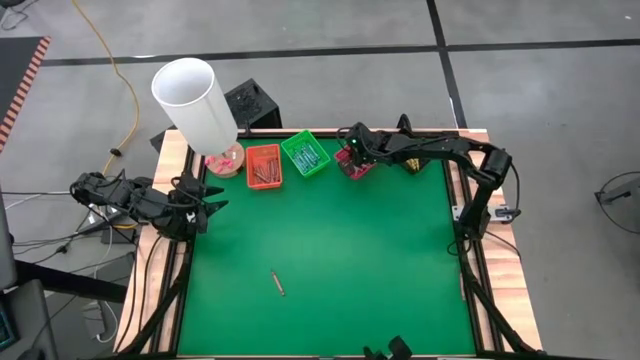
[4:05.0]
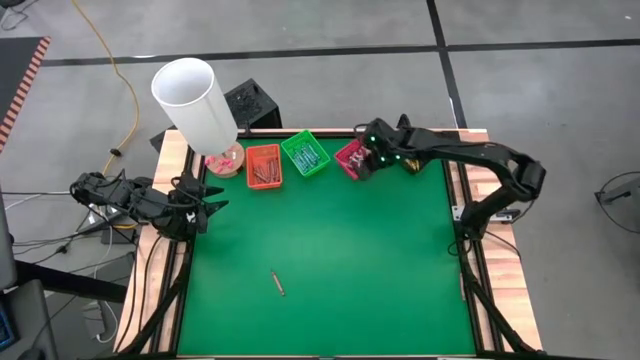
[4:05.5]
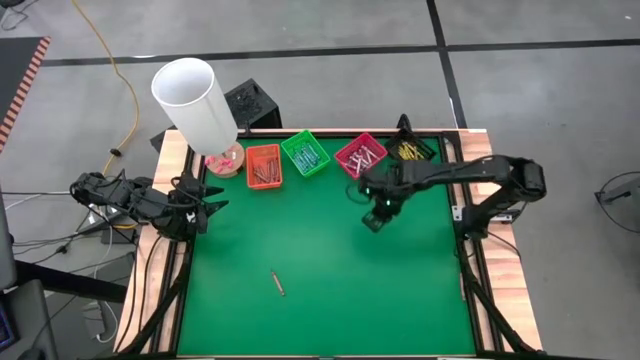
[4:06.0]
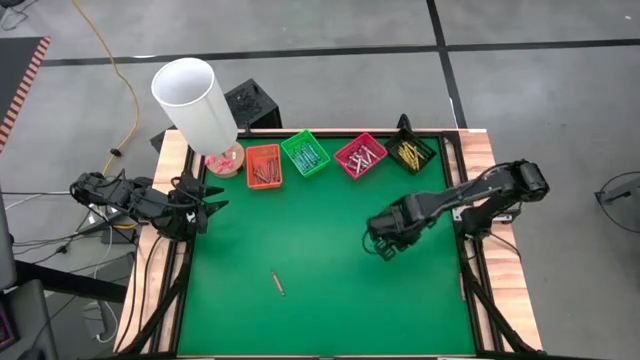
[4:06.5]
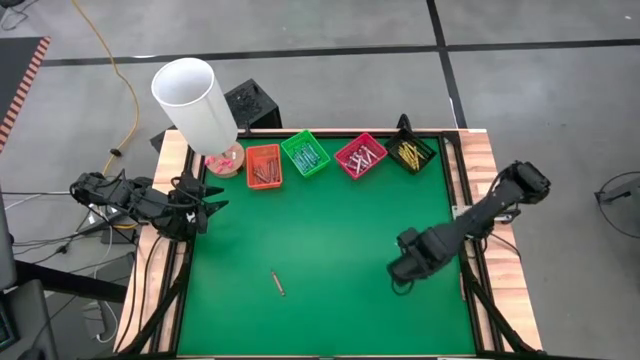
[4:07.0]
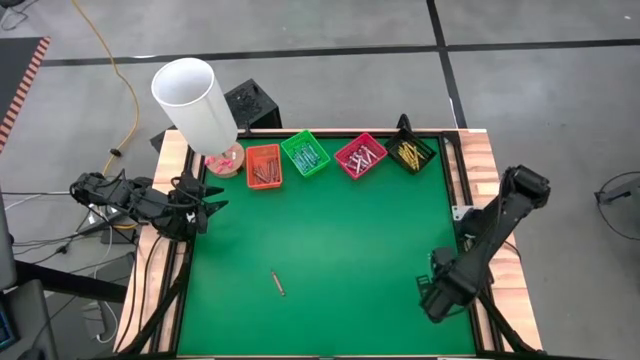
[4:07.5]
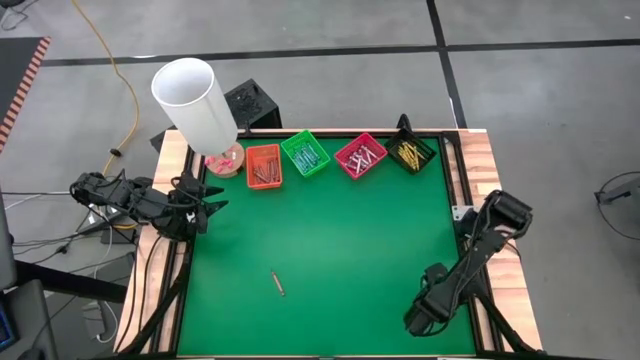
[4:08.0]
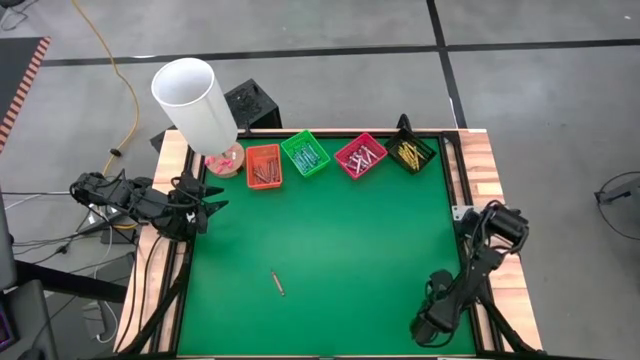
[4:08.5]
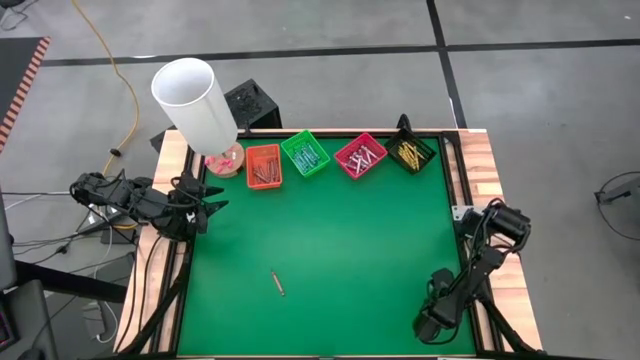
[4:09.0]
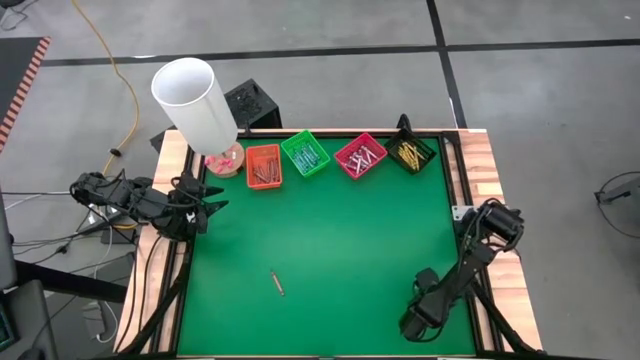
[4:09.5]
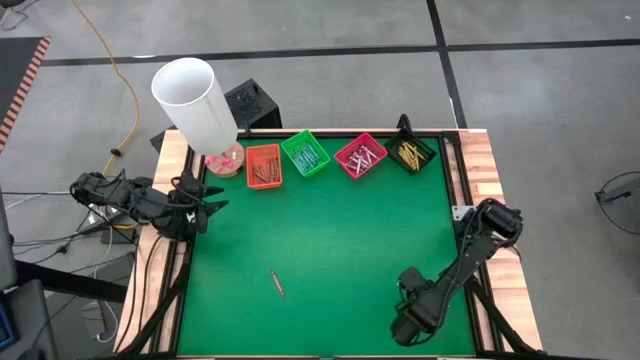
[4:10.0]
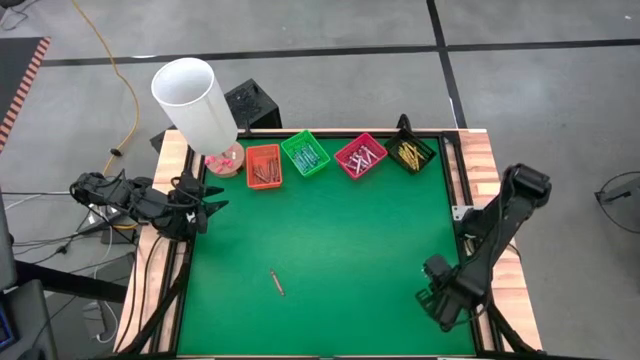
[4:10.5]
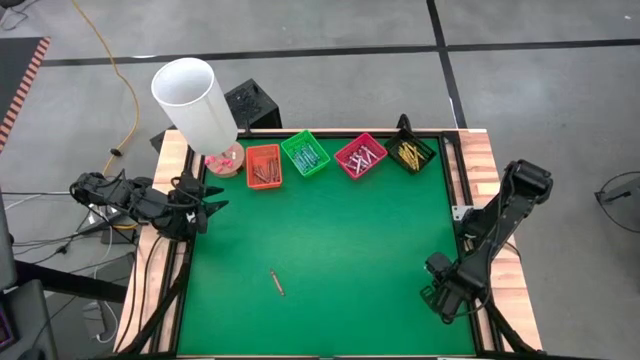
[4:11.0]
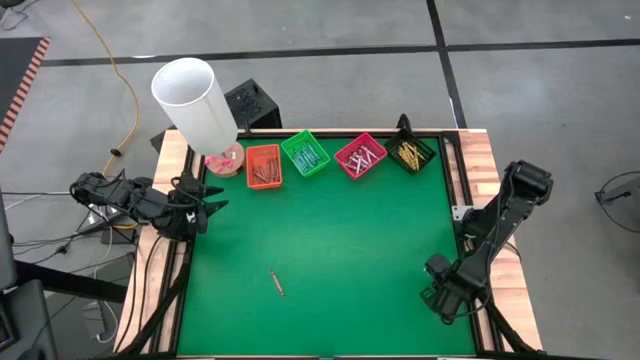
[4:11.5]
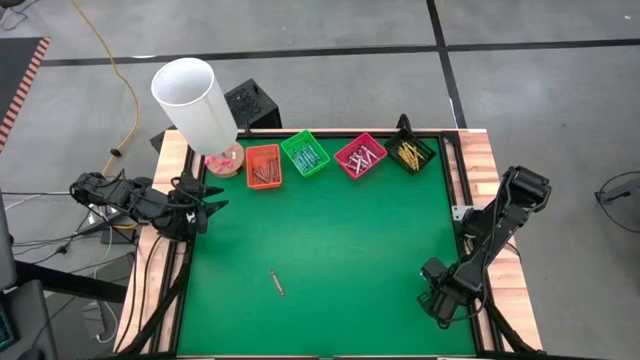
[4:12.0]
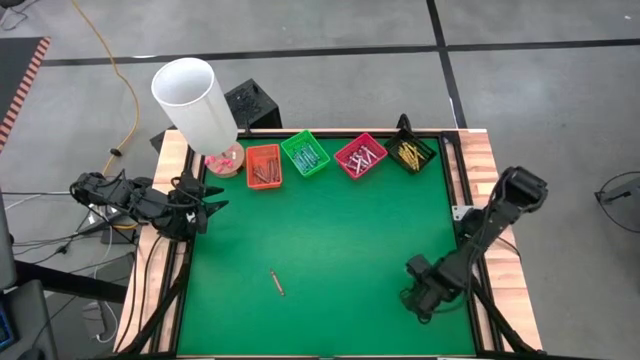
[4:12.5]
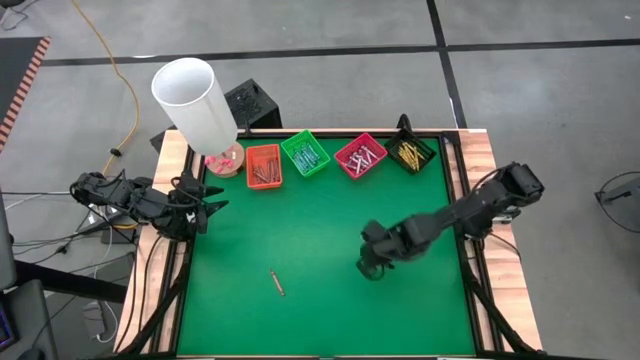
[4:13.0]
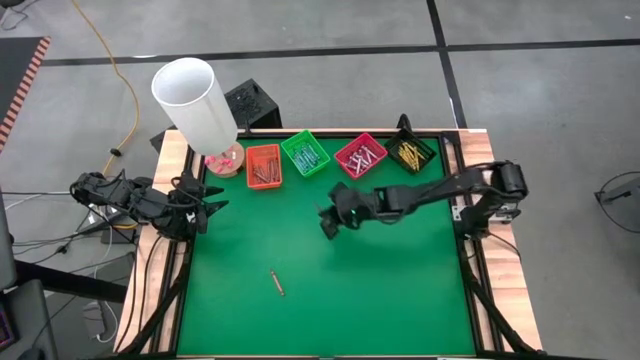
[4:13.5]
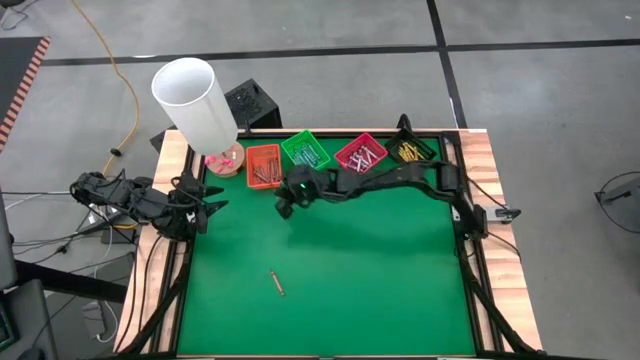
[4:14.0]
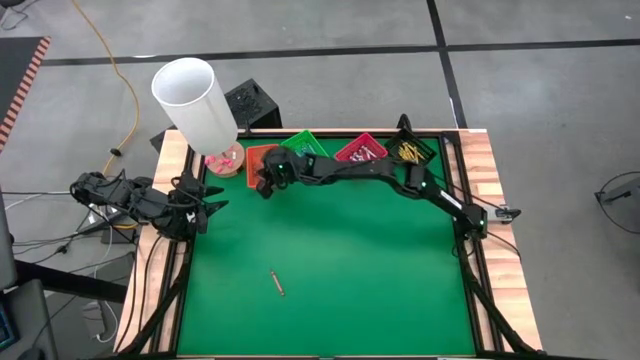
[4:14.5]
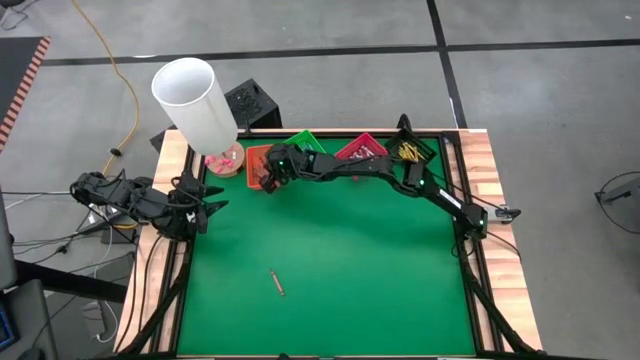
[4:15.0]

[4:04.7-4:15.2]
Task: Sort crayons
Put the brown crayon into the orange bin

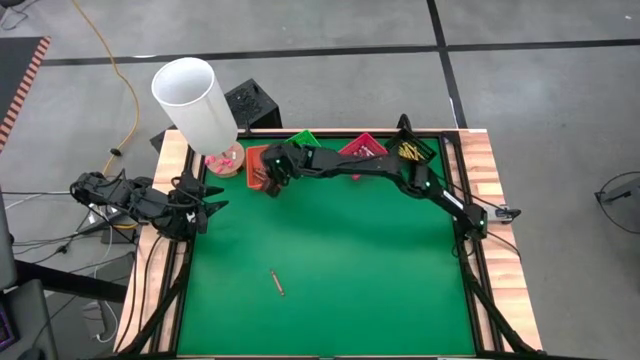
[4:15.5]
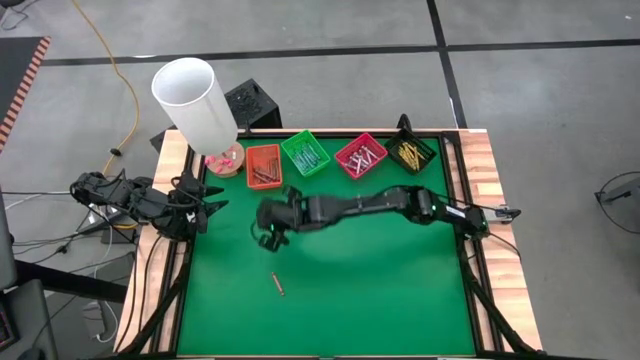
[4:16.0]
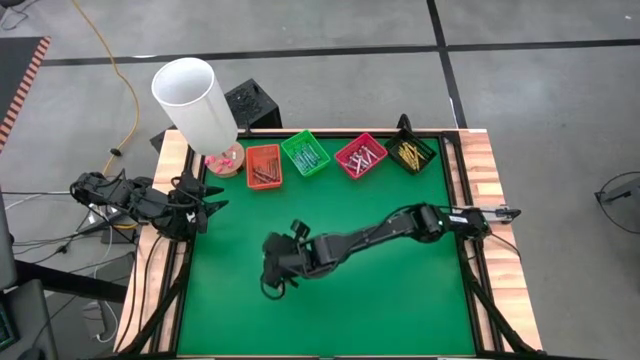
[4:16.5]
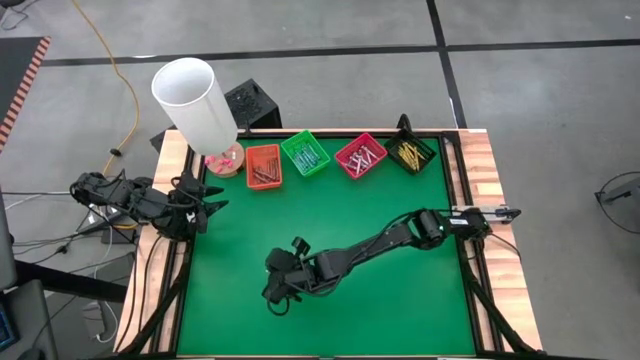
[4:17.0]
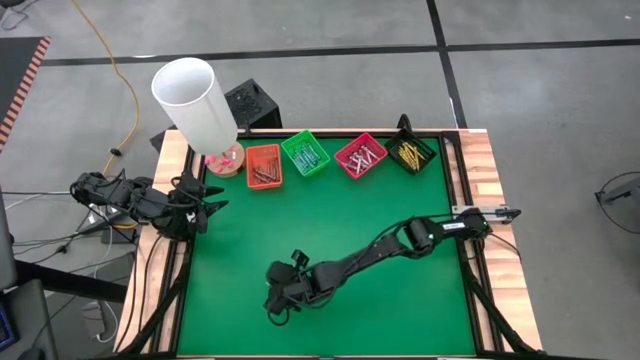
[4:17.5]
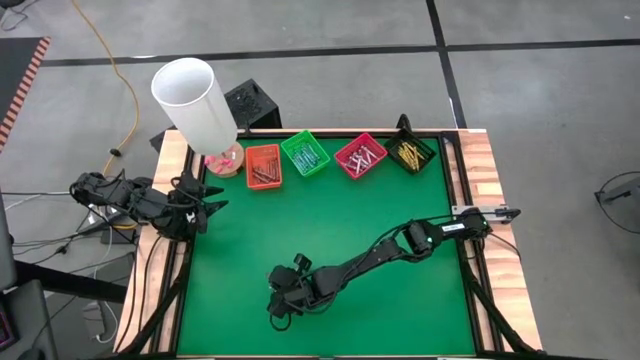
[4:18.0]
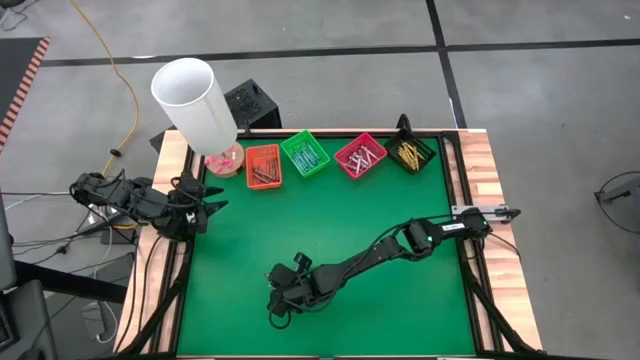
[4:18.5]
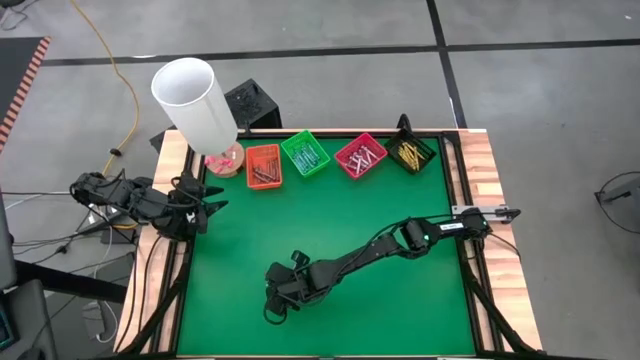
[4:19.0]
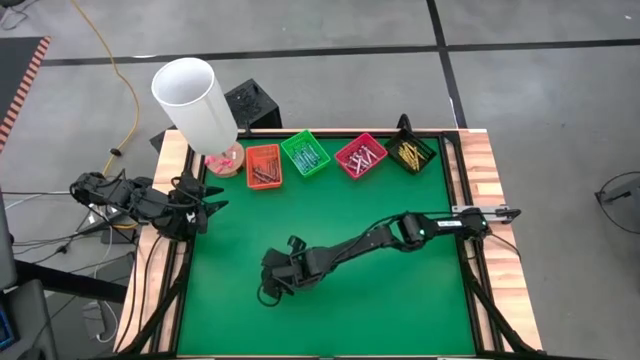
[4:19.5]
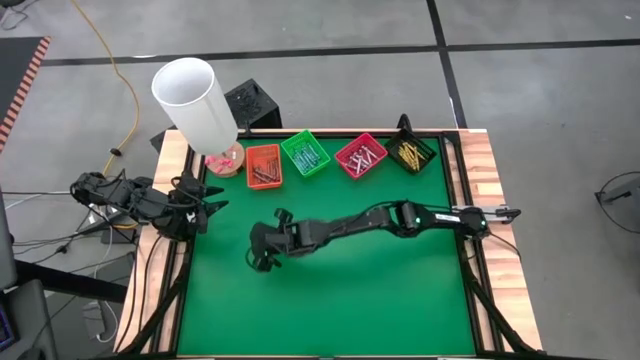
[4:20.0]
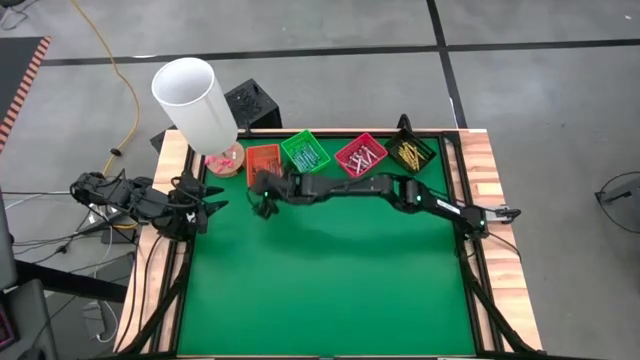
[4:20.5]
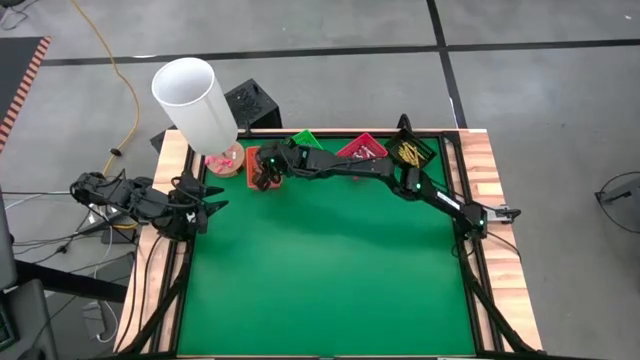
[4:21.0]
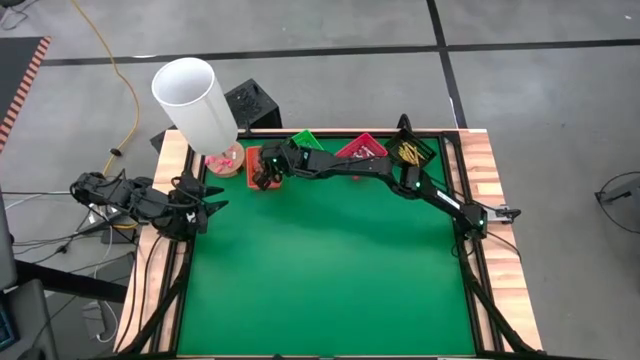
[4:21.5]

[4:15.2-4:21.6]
Put the brown crayon into the orange bin

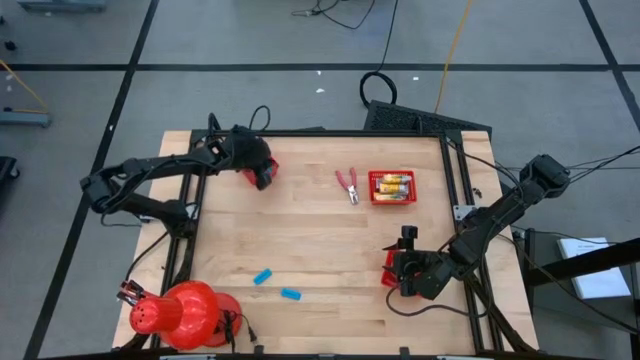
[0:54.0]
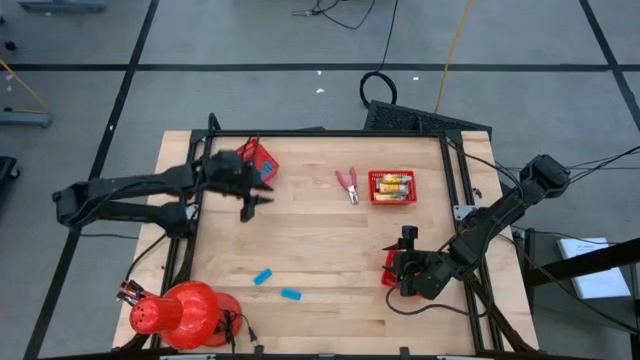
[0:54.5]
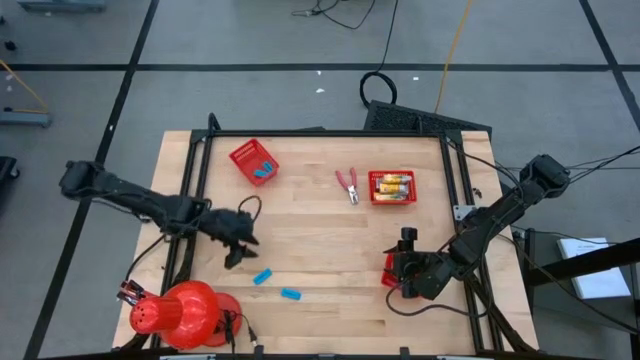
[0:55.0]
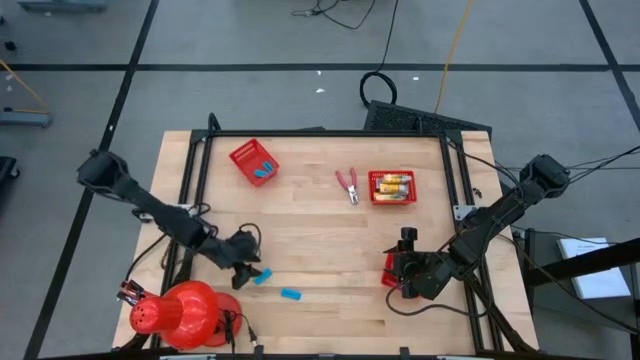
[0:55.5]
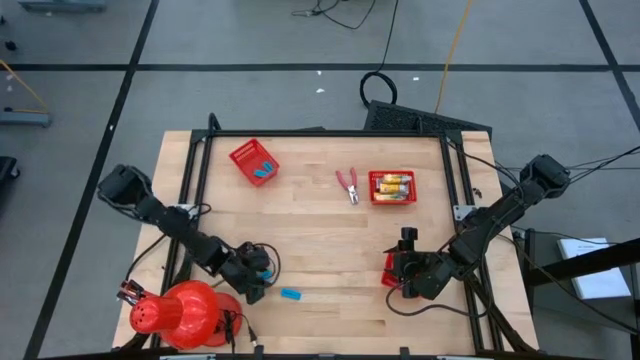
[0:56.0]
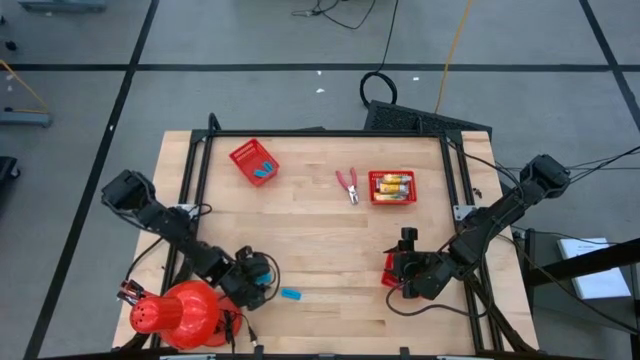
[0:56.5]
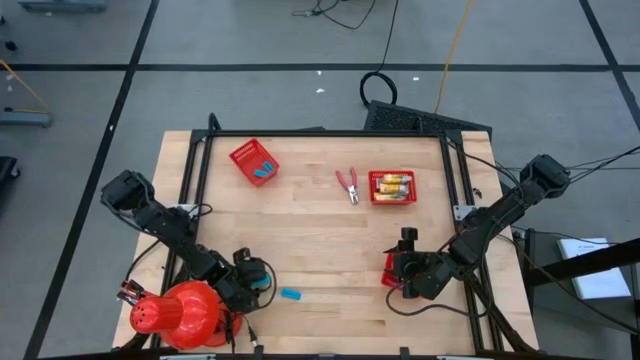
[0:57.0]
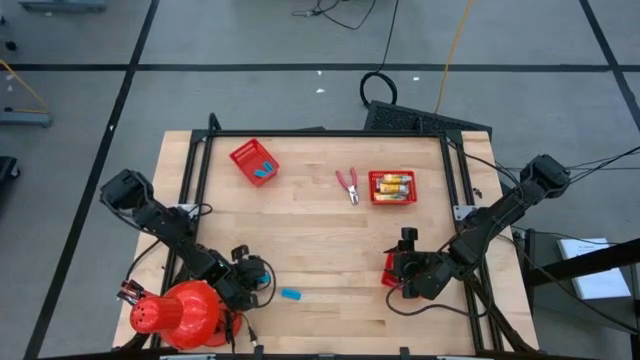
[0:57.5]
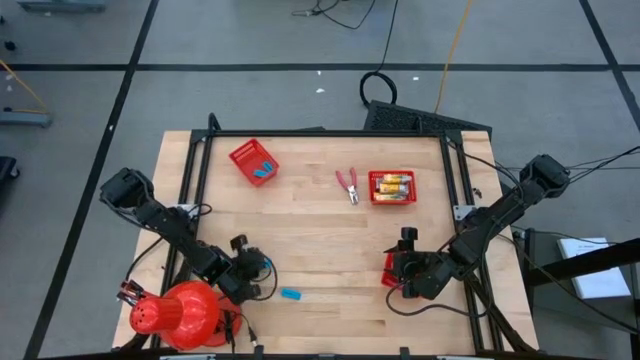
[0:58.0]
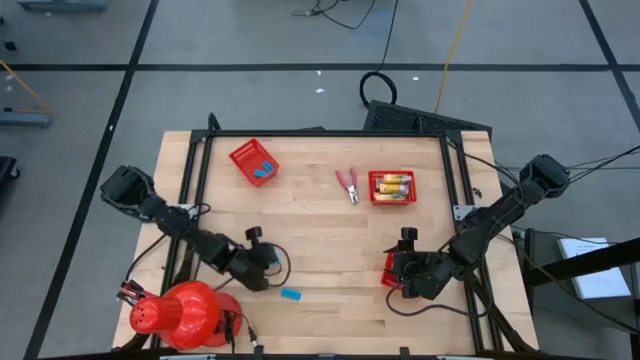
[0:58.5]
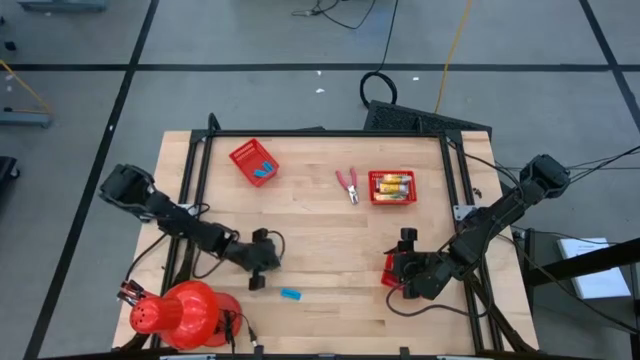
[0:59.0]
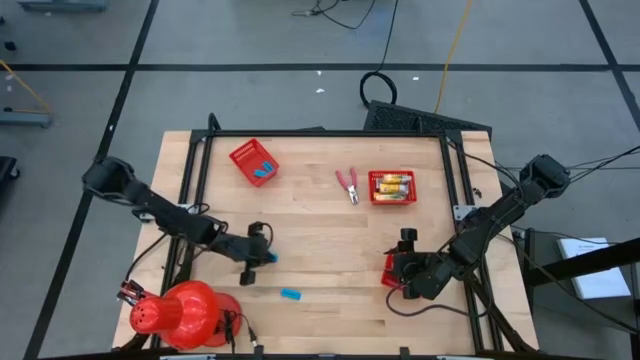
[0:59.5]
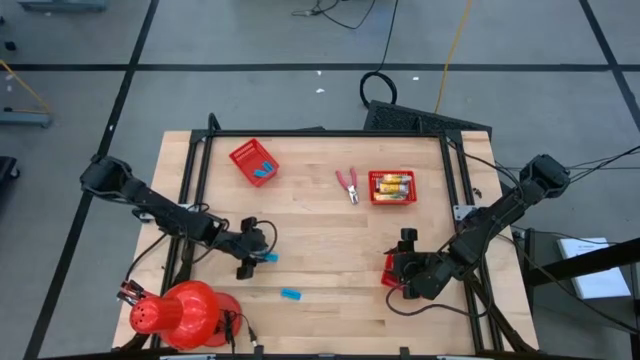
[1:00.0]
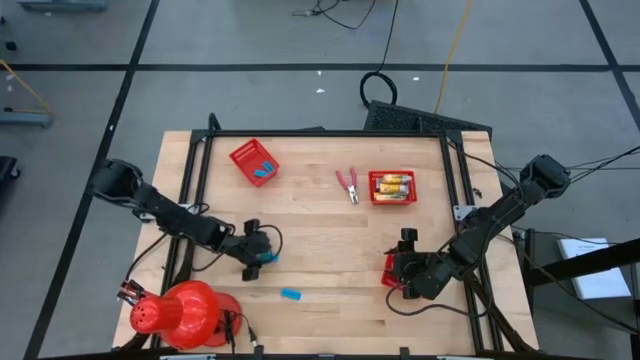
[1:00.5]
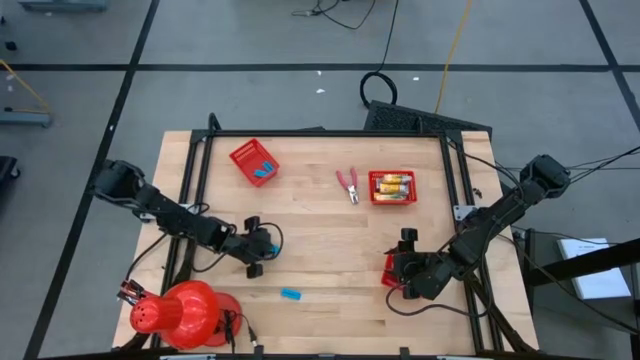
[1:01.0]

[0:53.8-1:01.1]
Task: Pick & Place School Supplies
Put the blue eraser into the top left red bin
